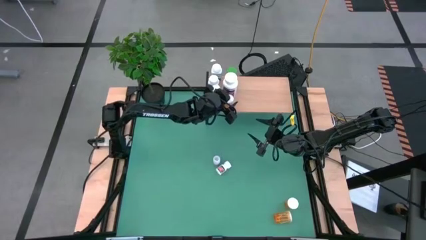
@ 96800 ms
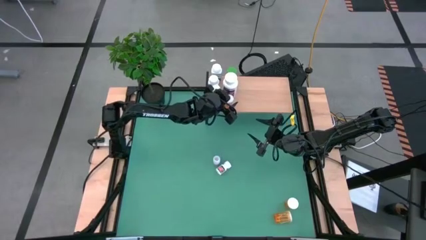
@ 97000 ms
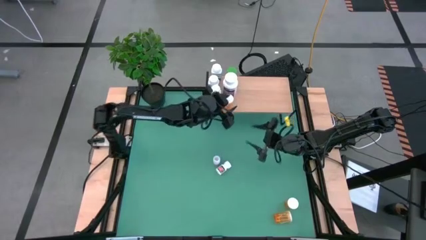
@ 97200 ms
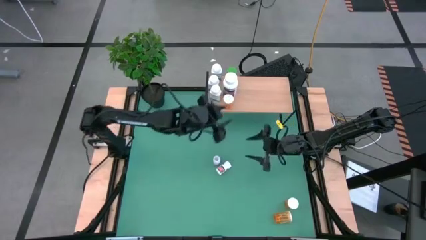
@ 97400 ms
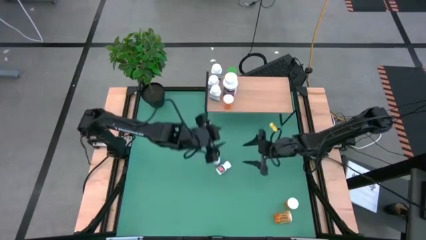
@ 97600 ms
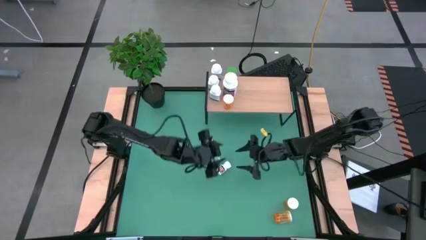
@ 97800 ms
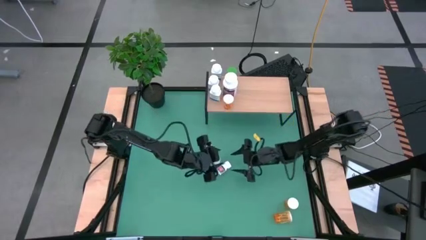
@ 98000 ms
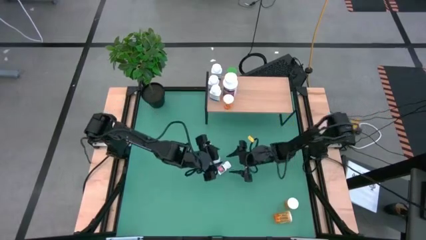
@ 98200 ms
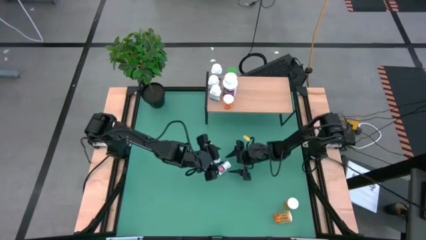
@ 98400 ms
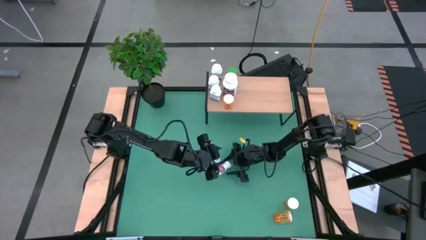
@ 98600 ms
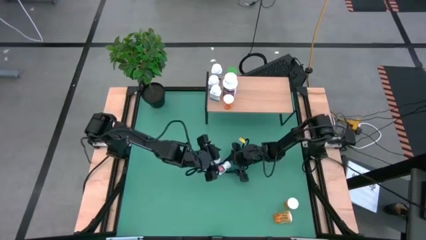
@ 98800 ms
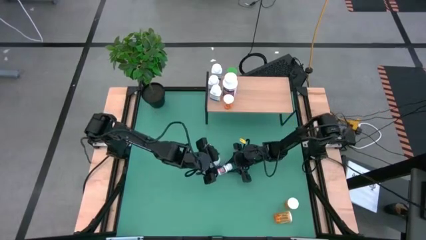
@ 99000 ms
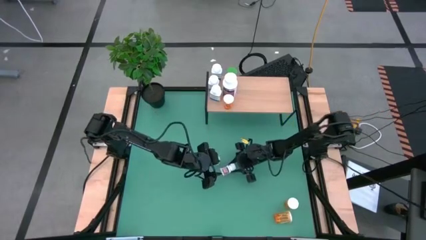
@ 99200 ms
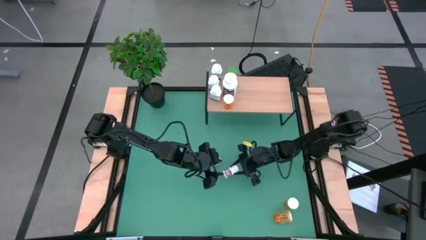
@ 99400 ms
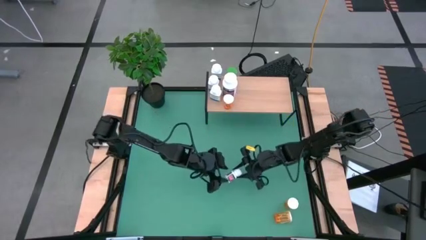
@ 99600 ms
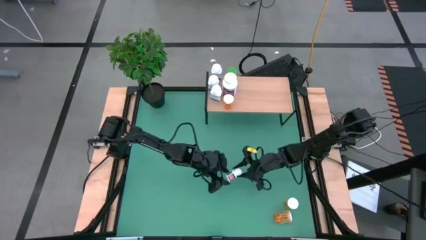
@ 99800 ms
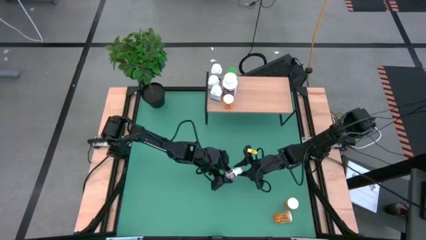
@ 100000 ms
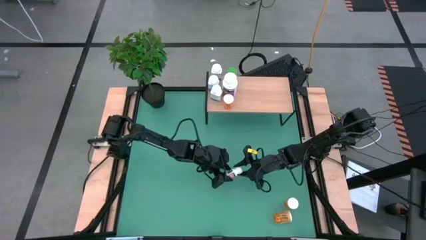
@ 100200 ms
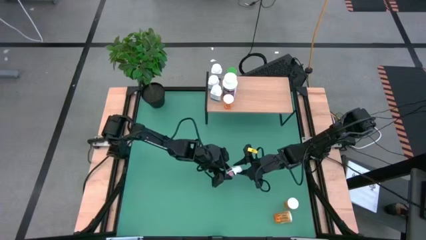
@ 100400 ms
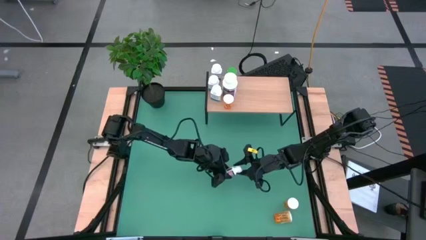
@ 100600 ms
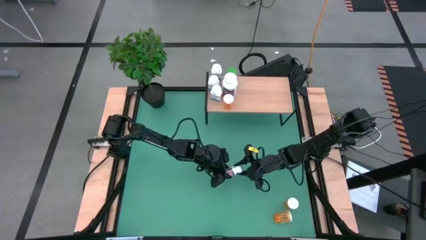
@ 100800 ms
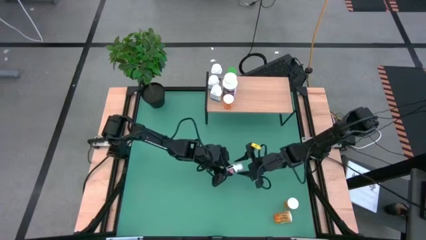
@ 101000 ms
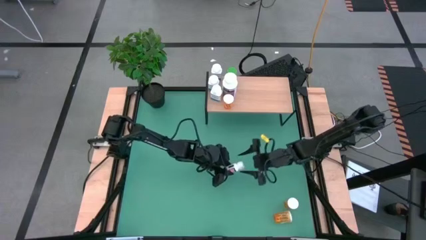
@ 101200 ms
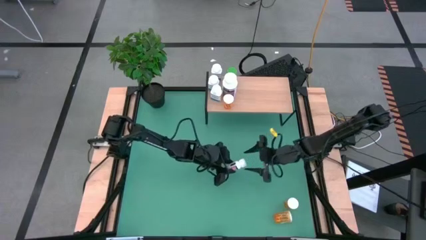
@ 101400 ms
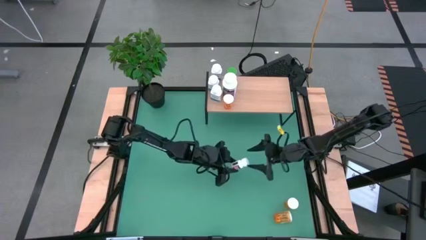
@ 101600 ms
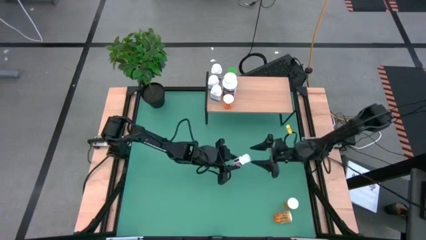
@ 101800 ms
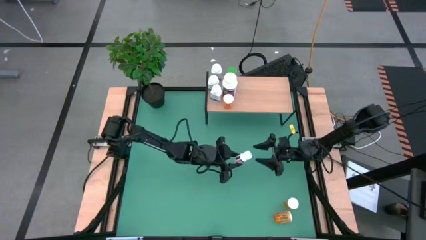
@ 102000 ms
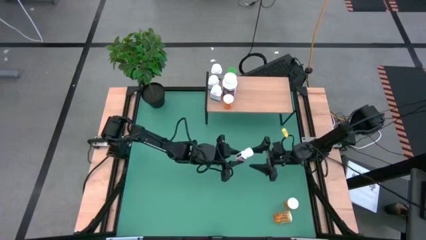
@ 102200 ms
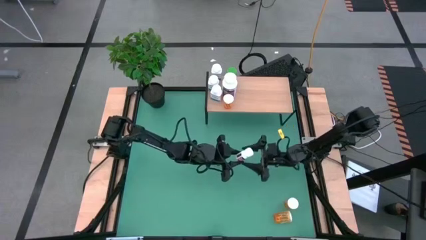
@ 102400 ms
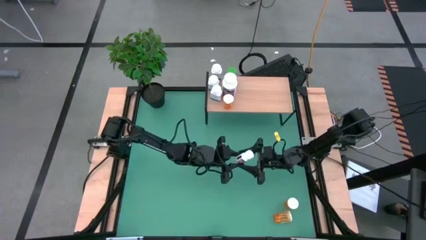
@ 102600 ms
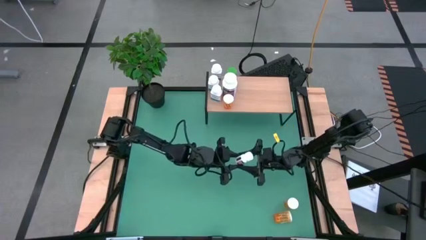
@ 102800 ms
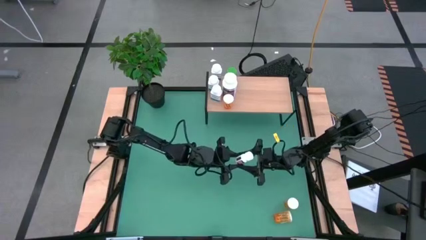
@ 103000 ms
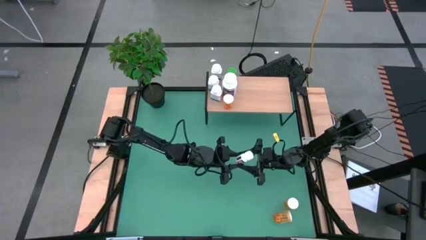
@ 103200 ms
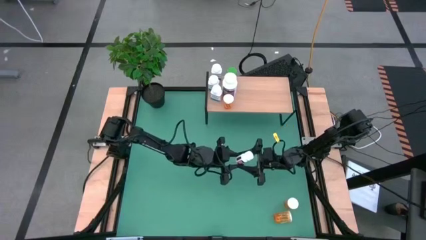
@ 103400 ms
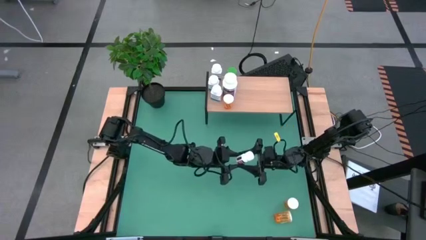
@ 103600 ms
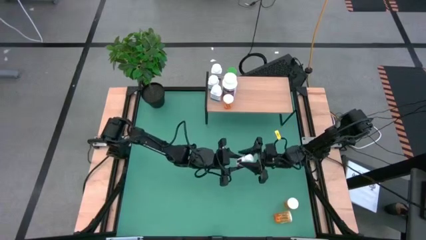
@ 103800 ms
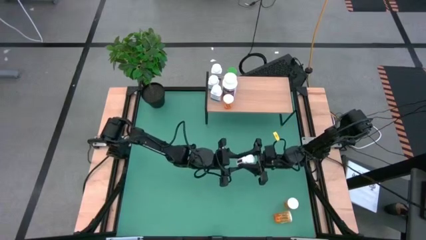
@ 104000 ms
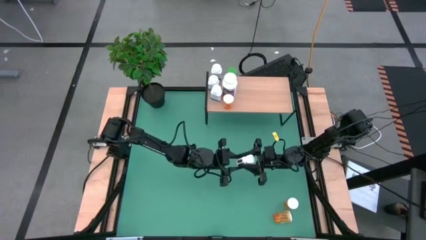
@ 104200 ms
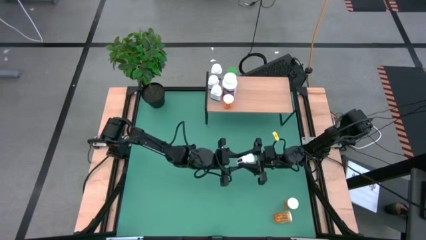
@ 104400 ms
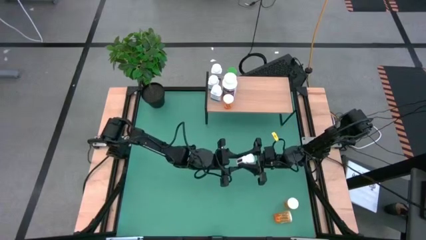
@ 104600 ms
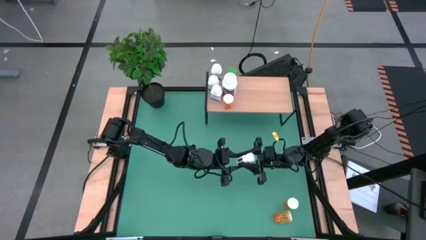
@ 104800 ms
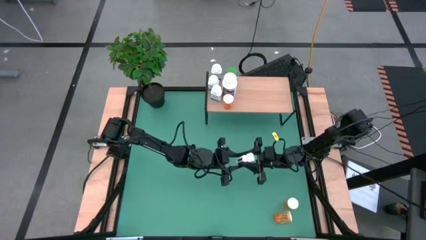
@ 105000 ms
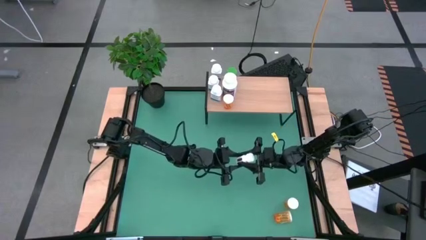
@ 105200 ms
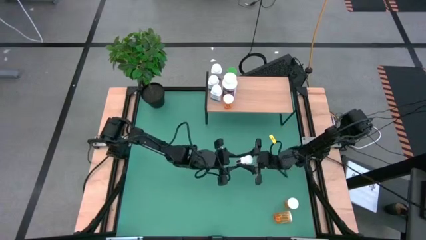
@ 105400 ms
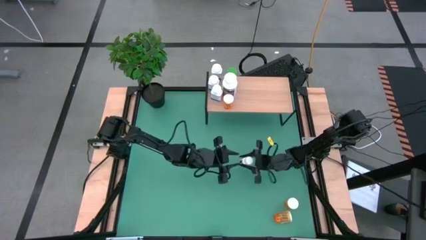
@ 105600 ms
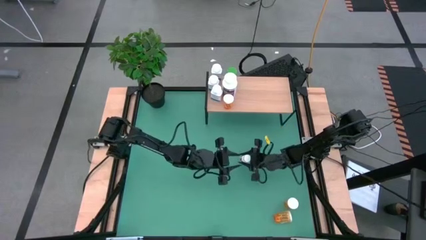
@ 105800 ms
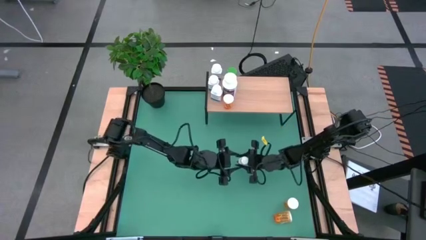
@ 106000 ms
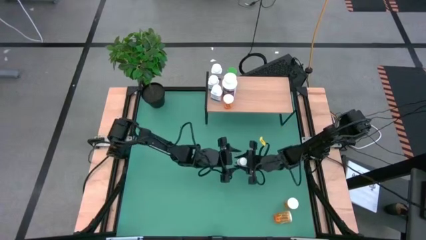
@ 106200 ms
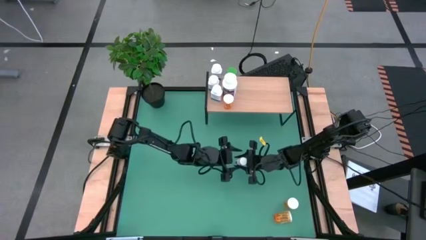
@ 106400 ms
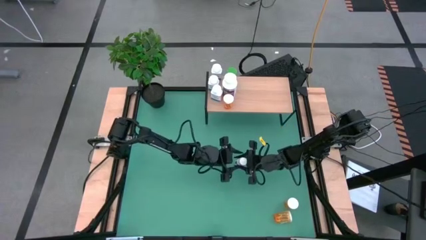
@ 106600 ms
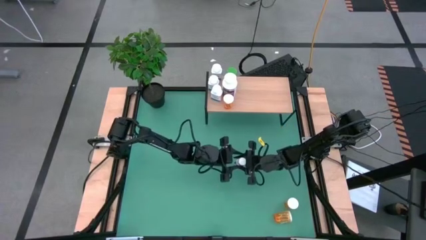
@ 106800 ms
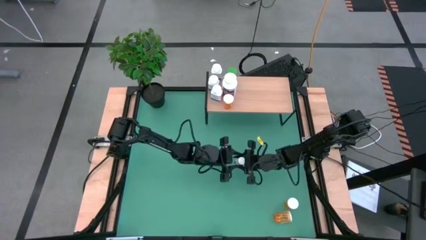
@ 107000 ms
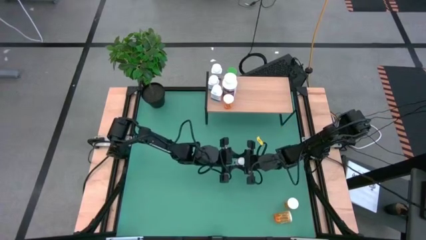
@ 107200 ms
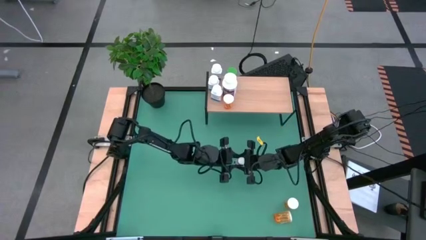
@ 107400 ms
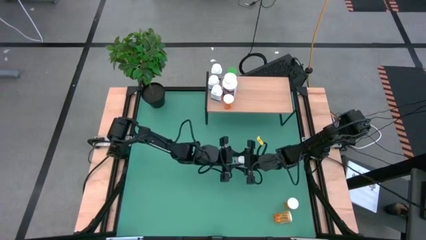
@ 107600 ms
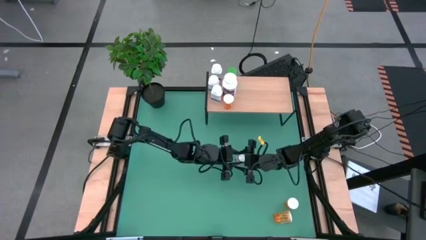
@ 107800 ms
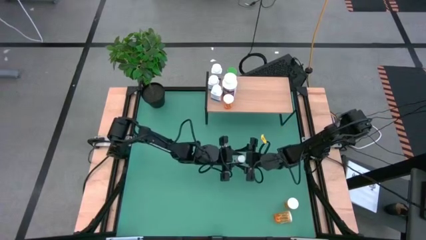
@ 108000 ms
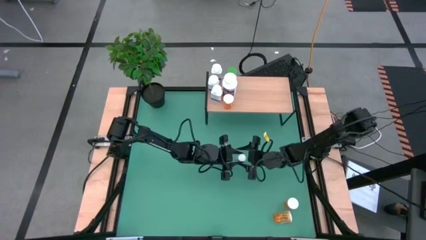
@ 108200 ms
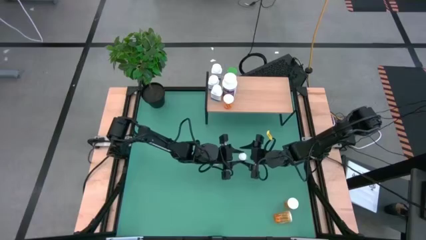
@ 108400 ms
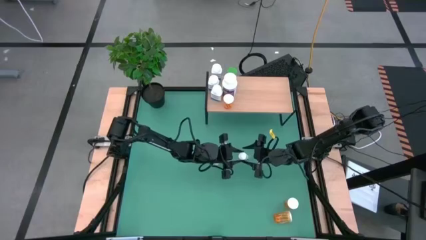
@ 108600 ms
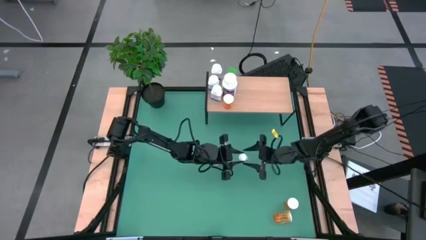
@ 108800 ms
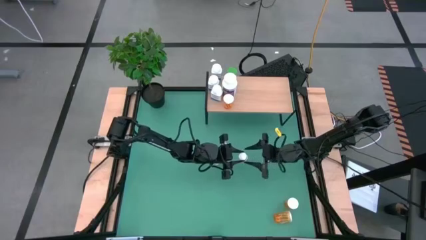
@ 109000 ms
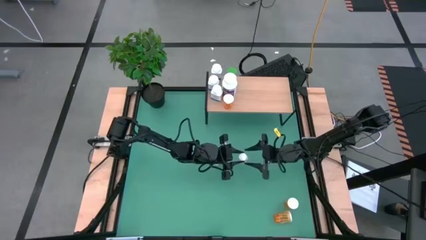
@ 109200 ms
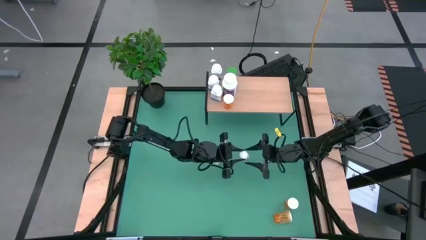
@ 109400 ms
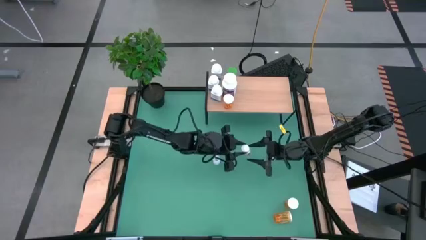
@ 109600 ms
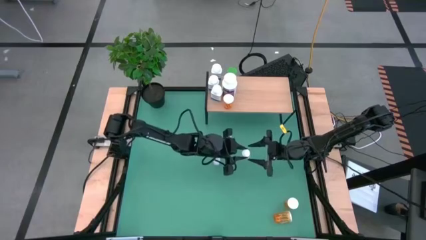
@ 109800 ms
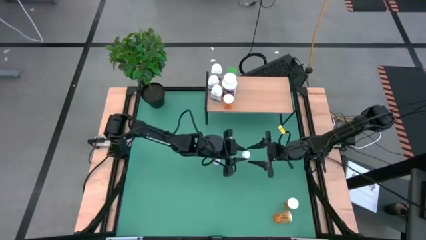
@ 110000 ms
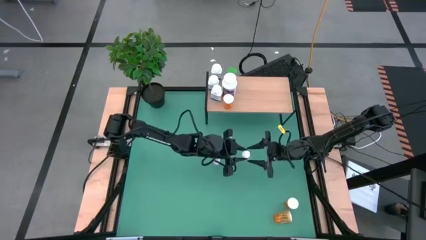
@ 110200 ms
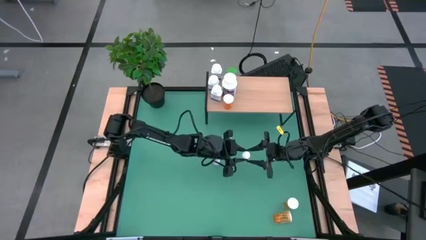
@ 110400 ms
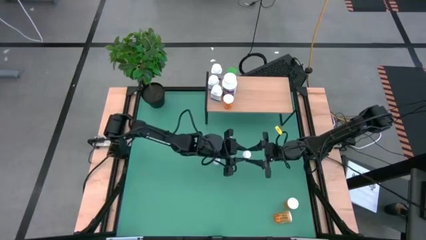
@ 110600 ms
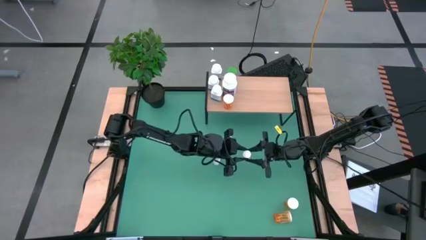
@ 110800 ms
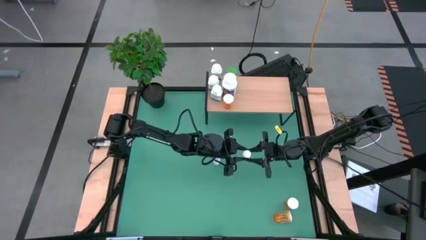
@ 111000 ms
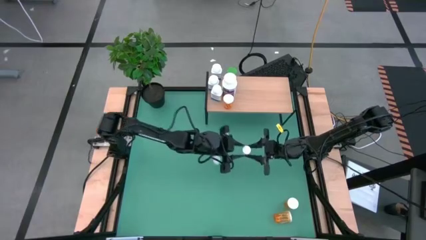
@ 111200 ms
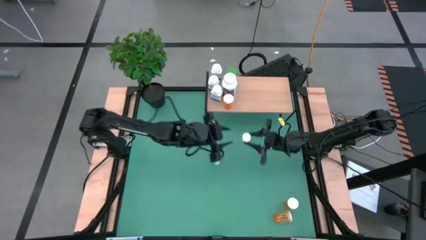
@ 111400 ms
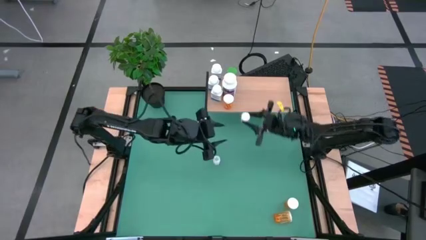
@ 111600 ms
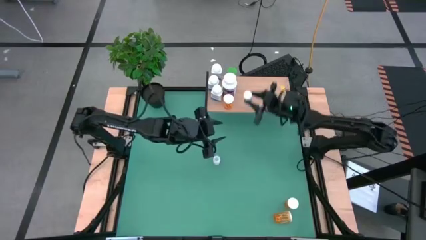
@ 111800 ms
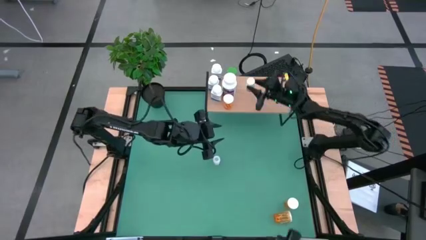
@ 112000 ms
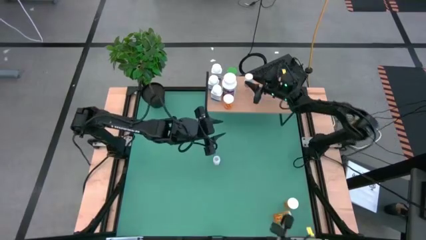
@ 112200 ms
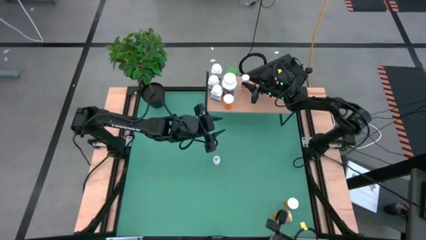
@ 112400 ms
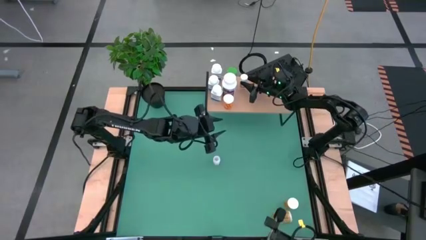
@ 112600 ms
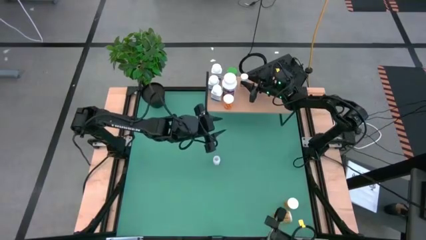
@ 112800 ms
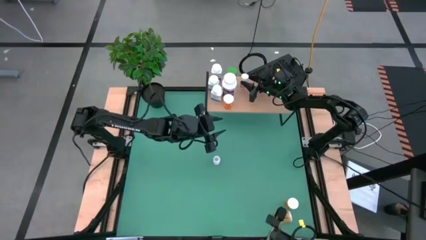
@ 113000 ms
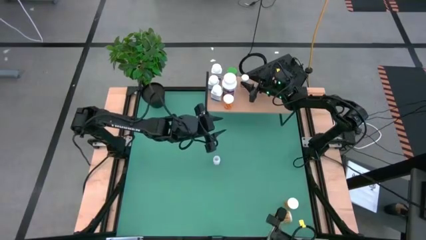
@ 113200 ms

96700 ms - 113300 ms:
Task: Pick and place medicine bottles onto shelf by color
Put the white and black pill bottle on the shelf
